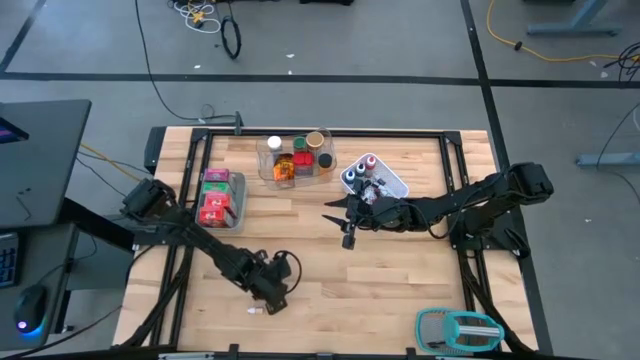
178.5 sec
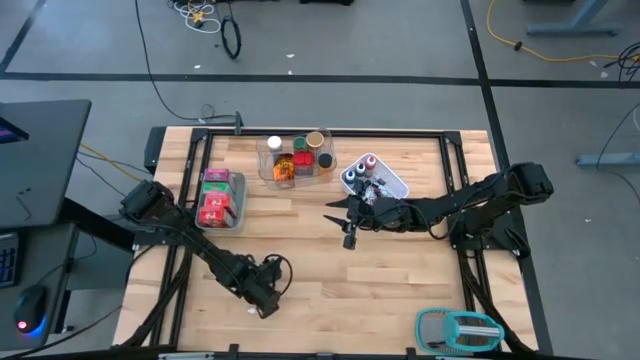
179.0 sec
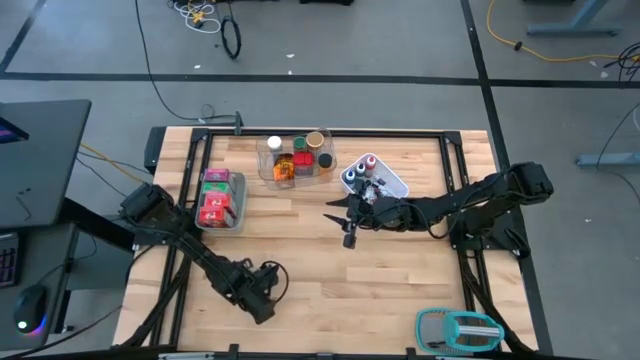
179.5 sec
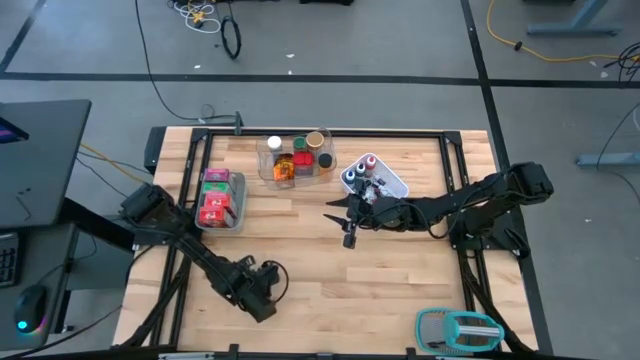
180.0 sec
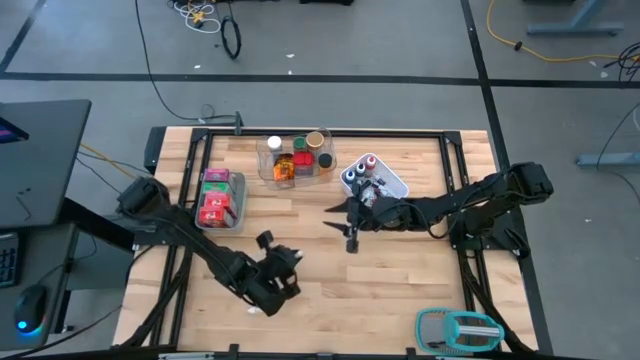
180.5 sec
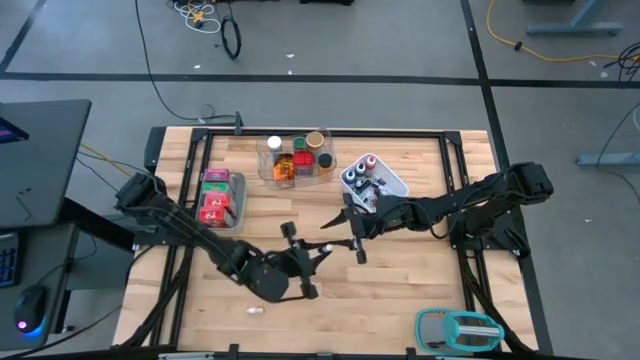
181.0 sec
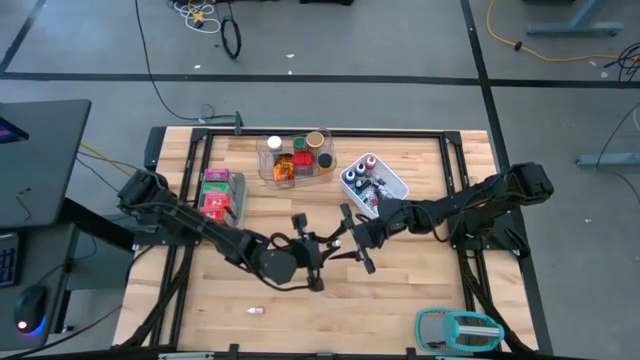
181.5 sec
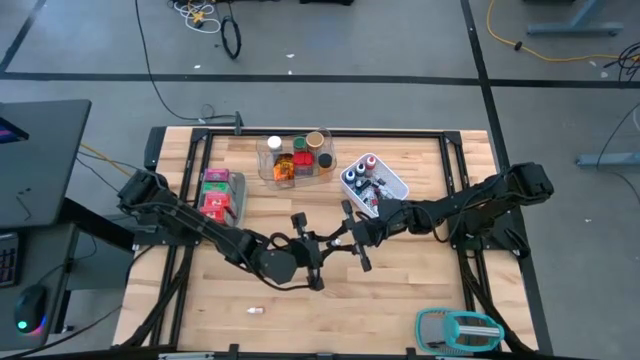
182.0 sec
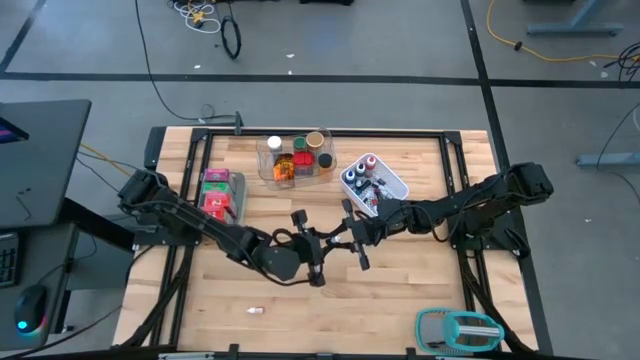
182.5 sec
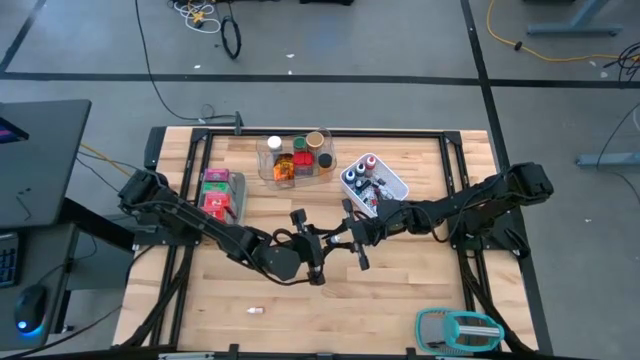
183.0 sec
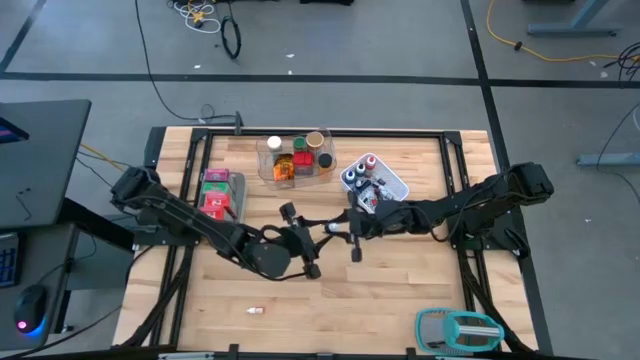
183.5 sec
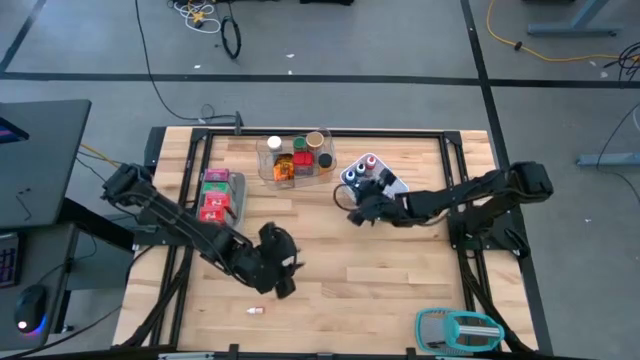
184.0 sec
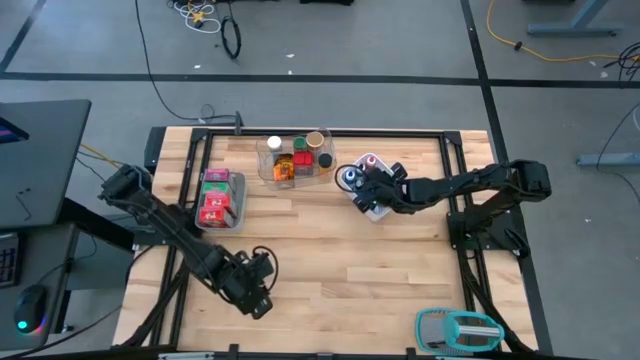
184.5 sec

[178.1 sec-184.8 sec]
Task: Pick & Place Kitchen Items
Put the black food coloring bottle into the white bin

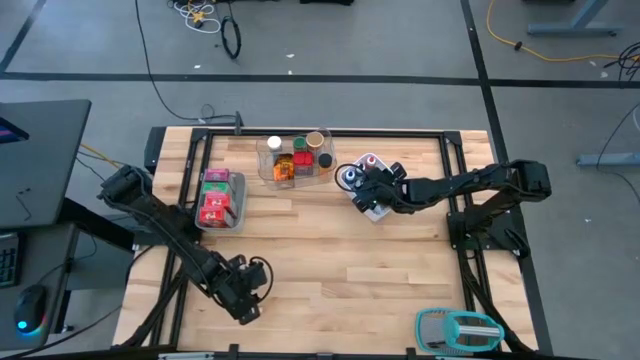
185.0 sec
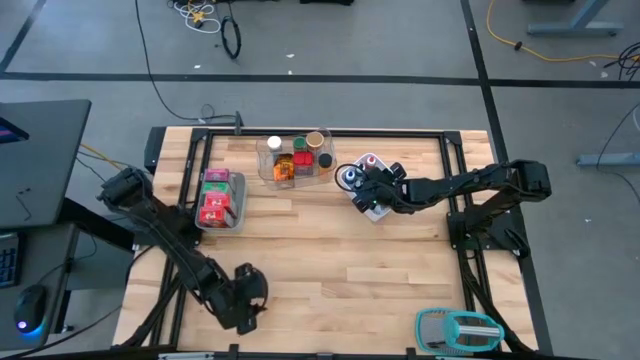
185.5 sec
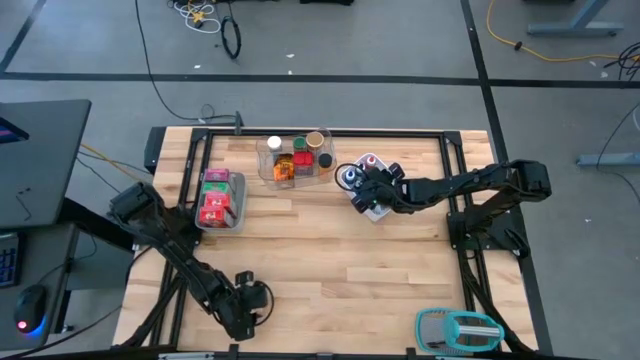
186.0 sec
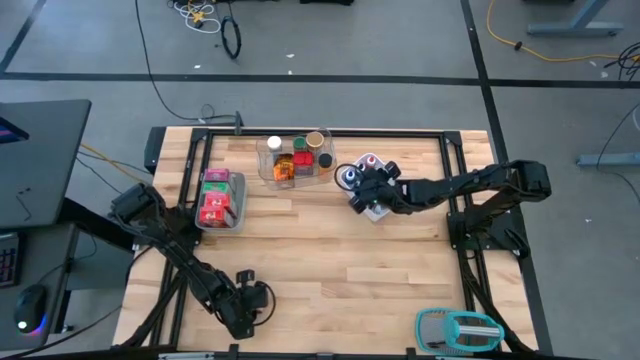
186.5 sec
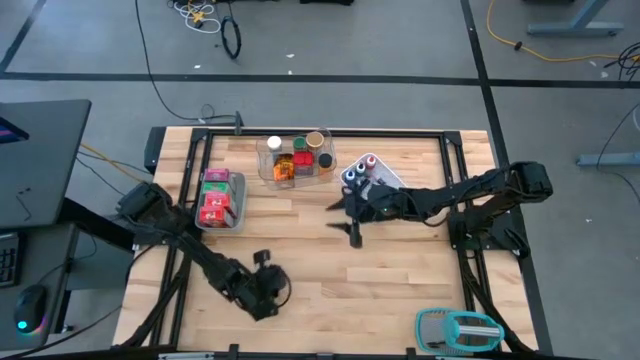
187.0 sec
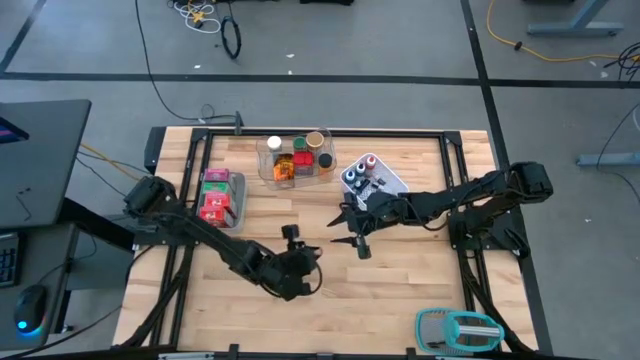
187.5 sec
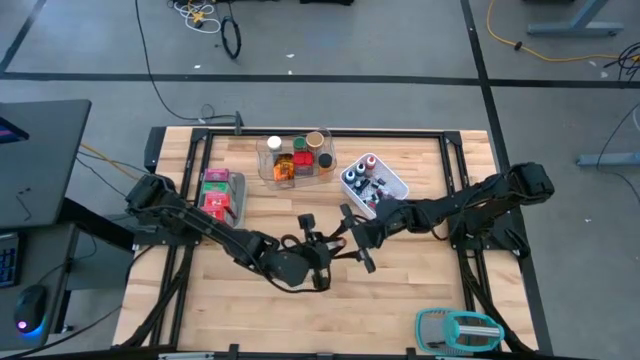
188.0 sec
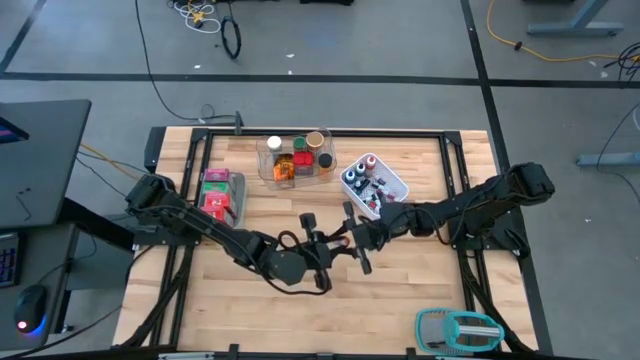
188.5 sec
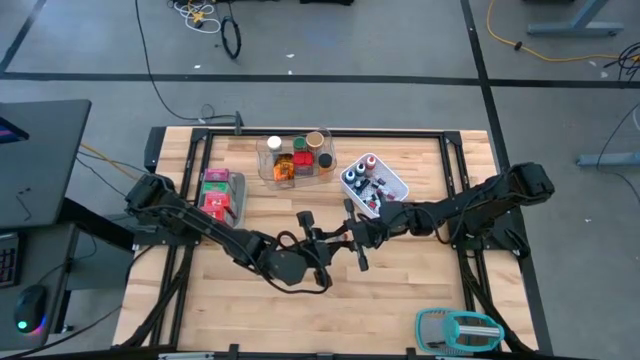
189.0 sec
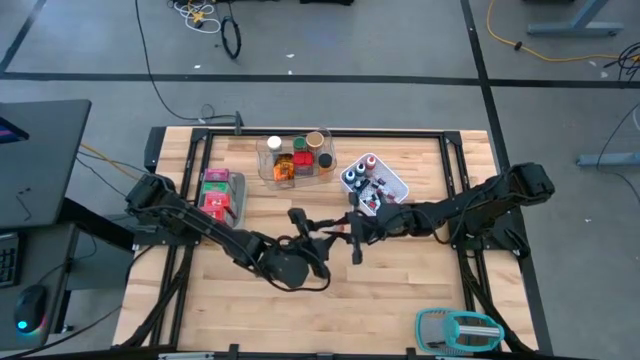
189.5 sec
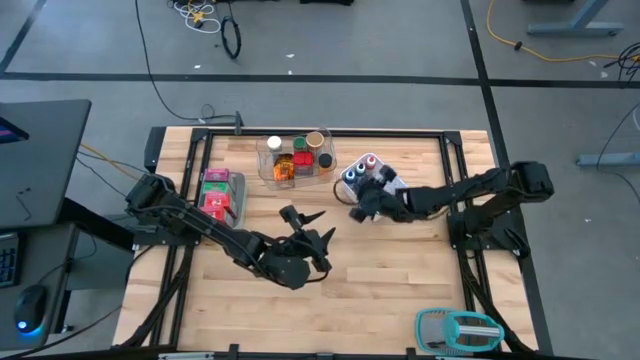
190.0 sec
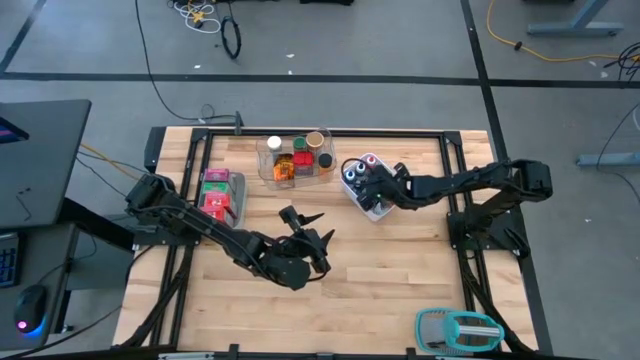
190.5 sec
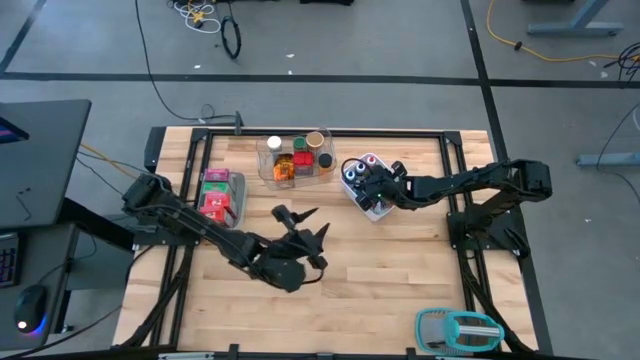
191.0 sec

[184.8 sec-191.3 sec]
Put the orange food coloring bottle into the white bin

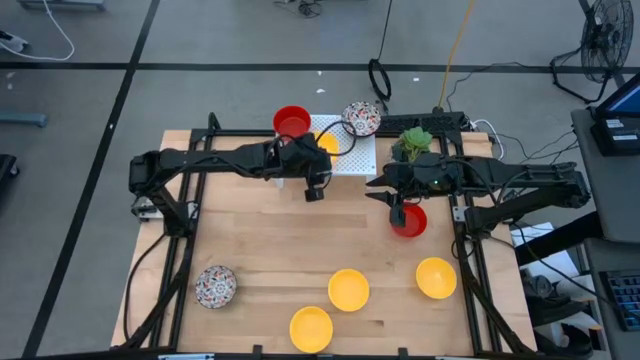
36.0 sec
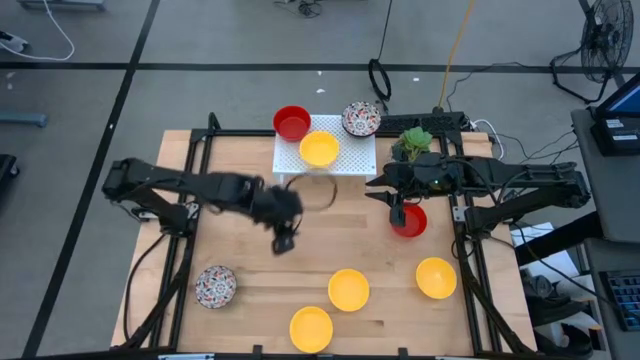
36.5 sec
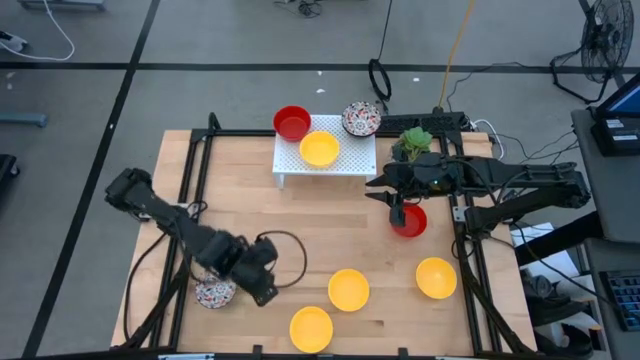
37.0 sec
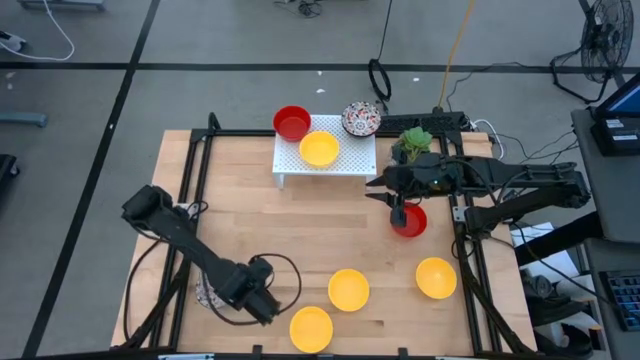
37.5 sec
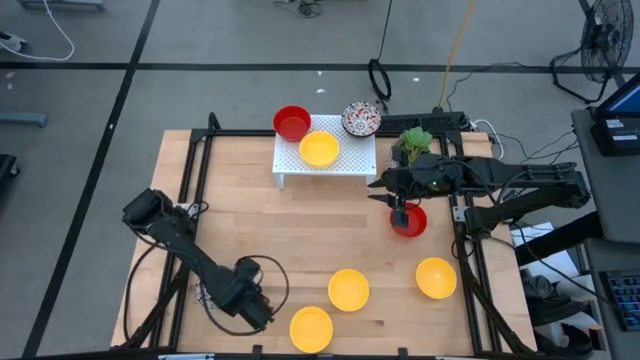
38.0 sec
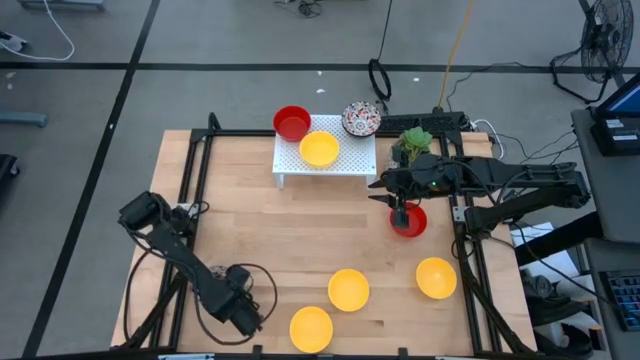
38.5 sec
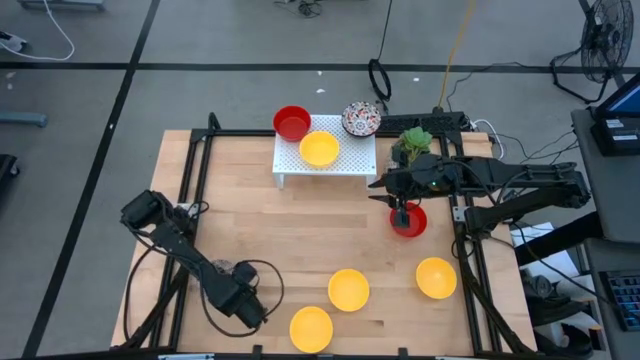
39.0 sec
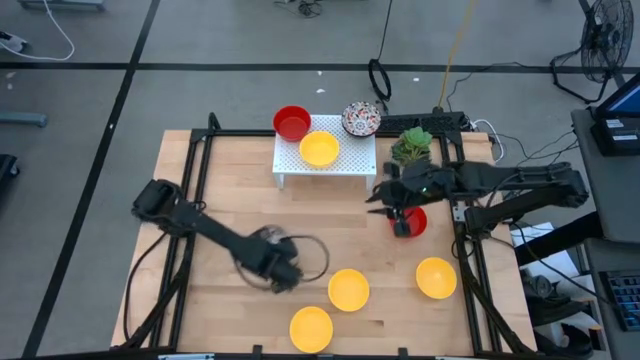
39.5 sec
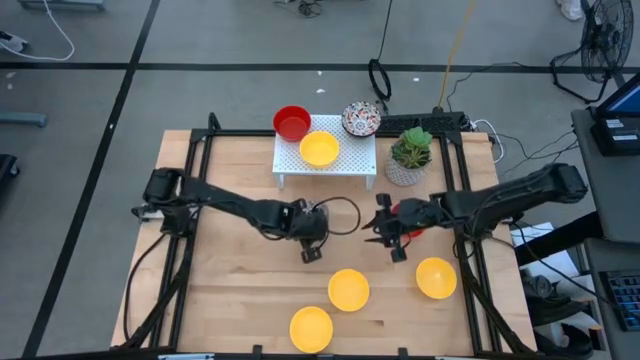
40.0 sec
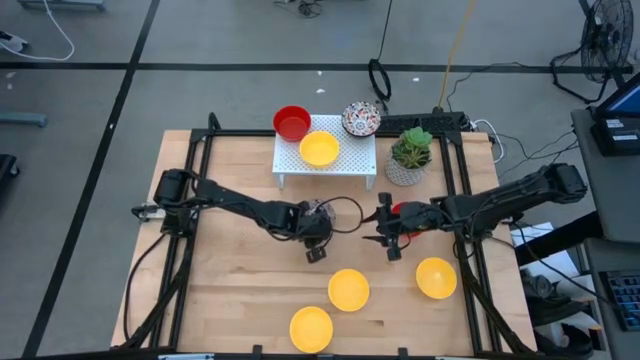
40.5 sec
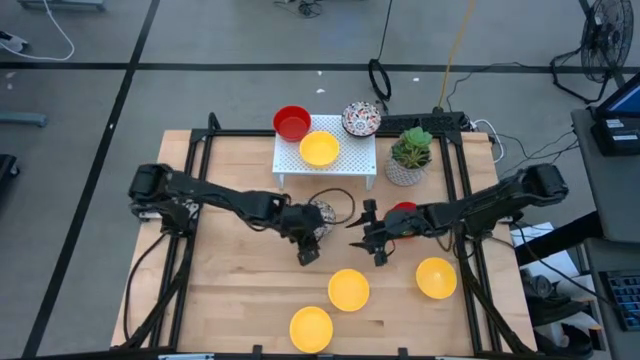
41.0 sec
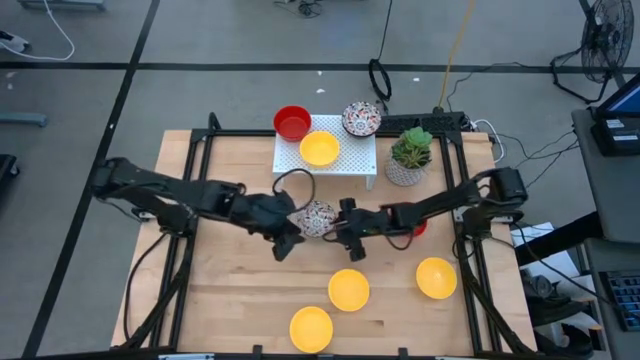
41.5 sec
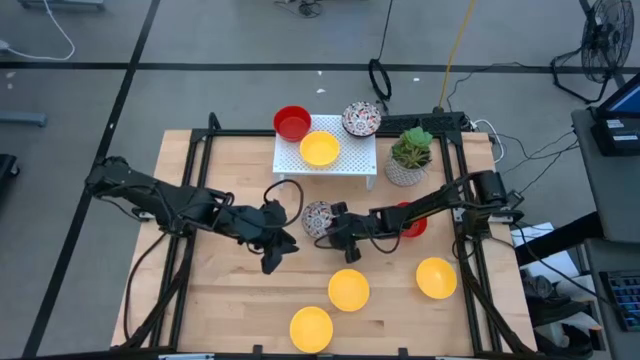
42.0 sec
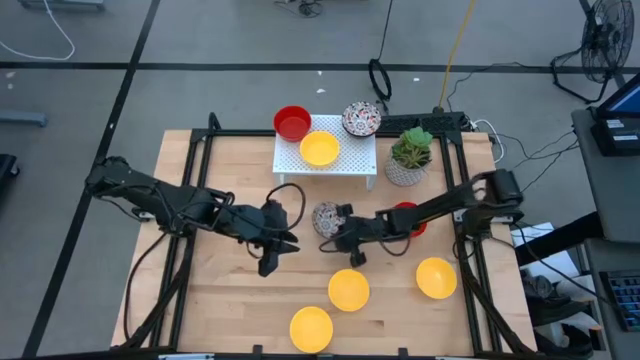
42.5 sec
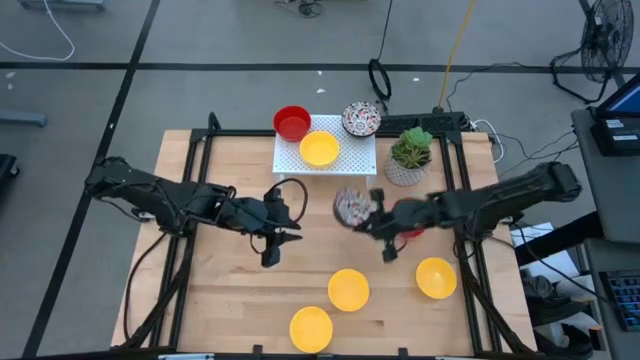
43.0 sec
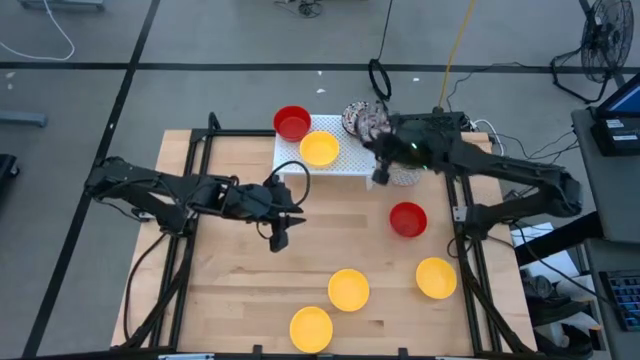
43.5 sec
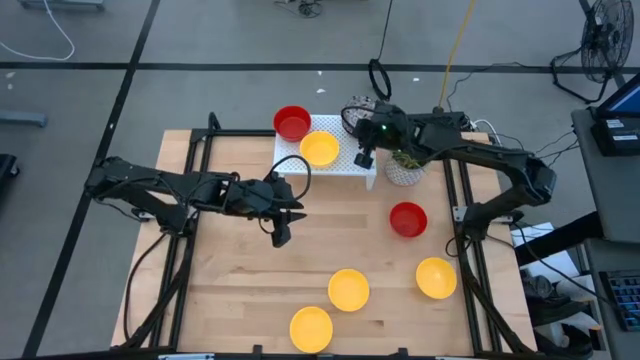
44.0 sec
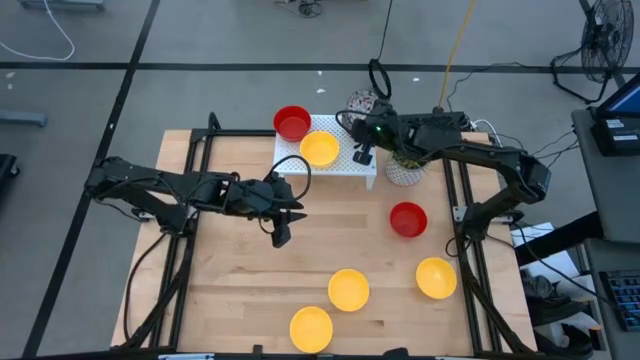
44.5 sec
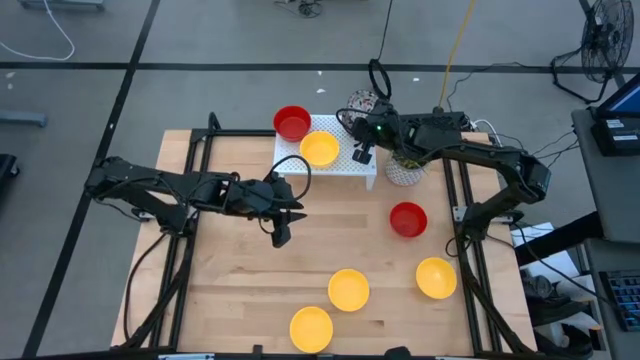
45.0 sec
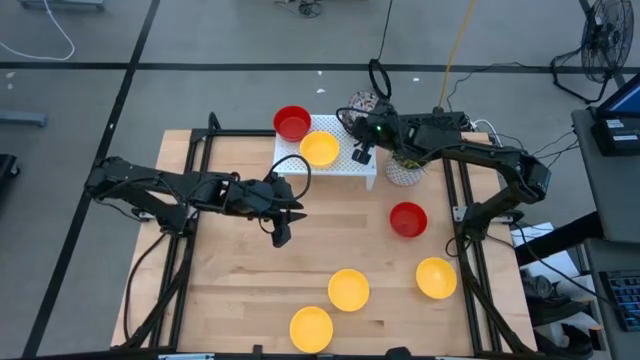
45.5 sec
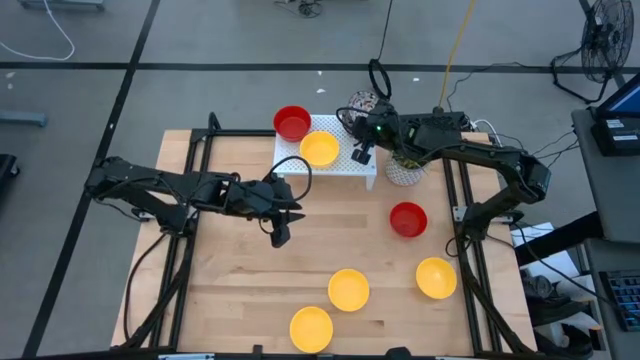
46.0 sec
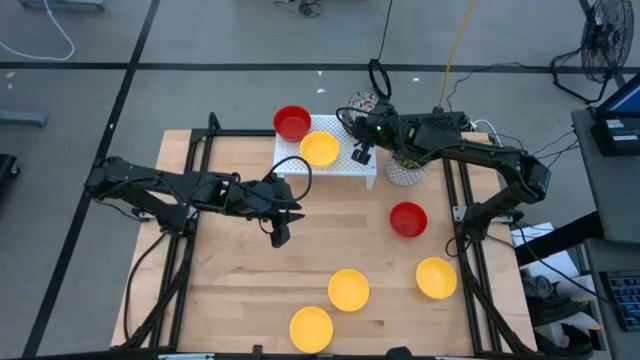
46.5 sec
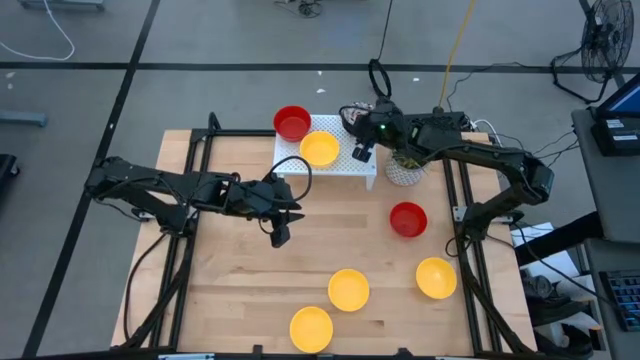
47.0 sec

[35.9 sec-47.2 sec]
Task: Pick & Place Mini bowls
Stack the white patterned bowl on the other white patterned bowls on the shelf
